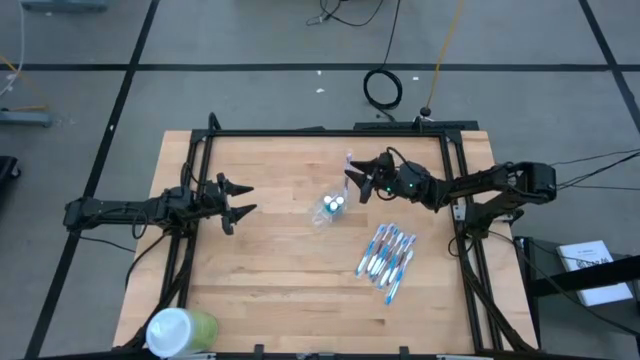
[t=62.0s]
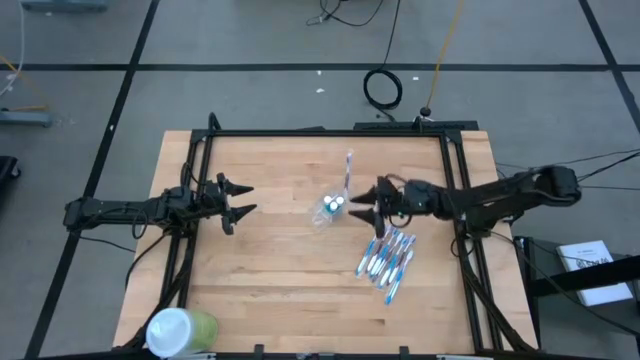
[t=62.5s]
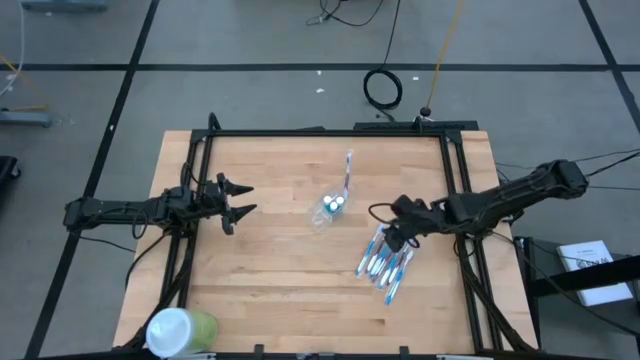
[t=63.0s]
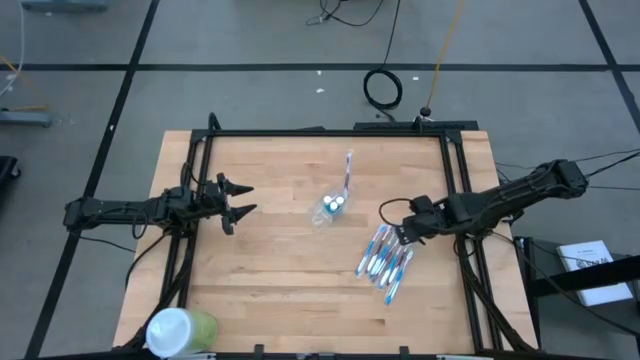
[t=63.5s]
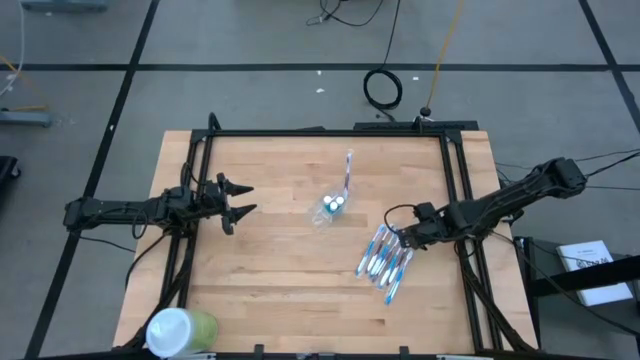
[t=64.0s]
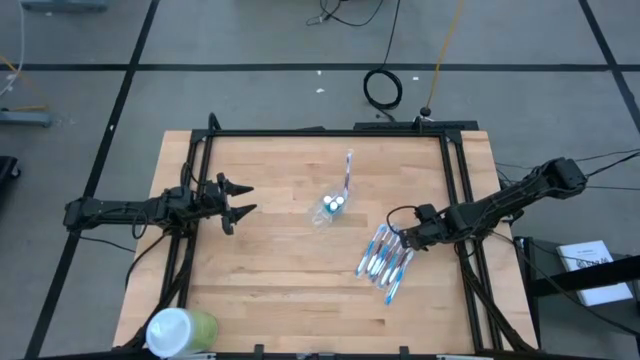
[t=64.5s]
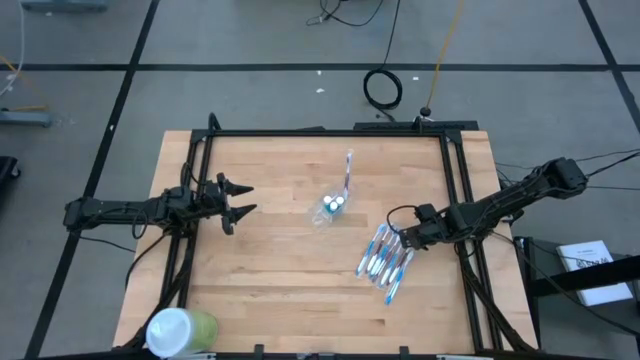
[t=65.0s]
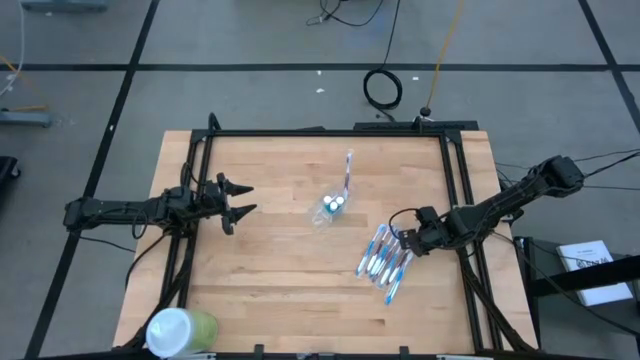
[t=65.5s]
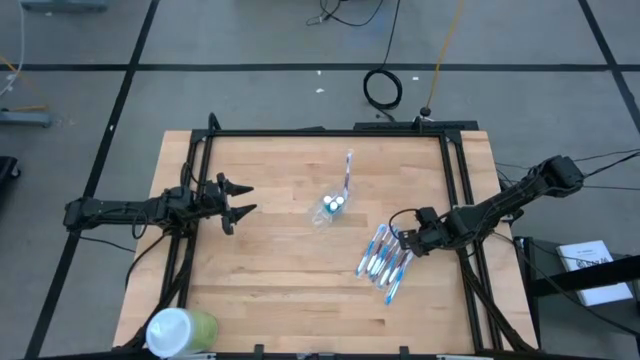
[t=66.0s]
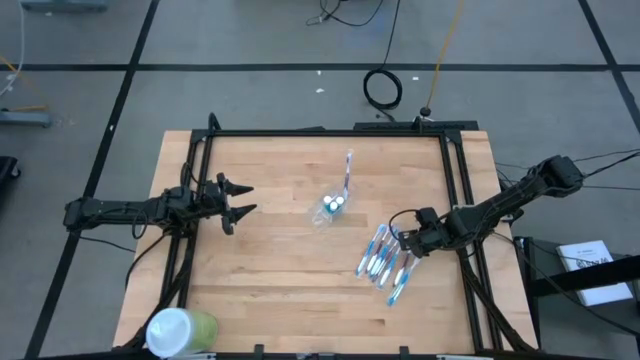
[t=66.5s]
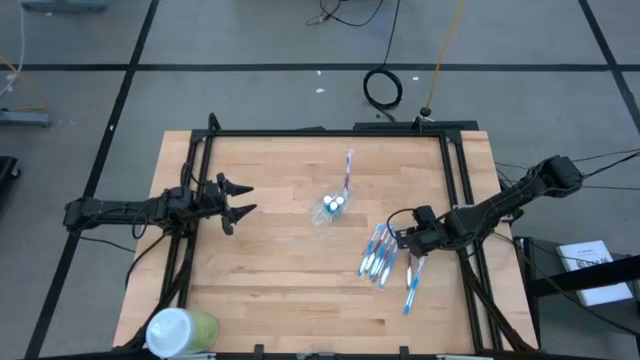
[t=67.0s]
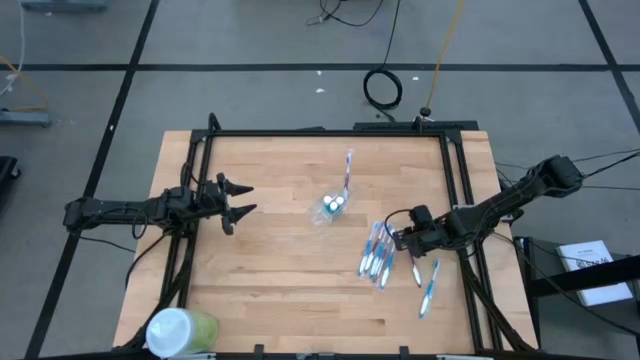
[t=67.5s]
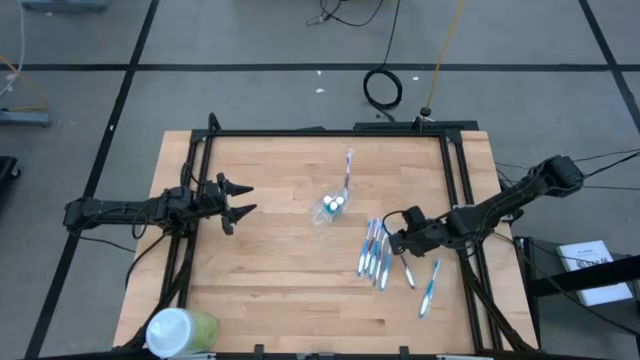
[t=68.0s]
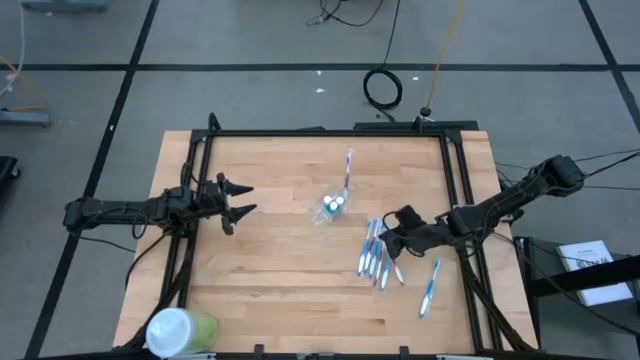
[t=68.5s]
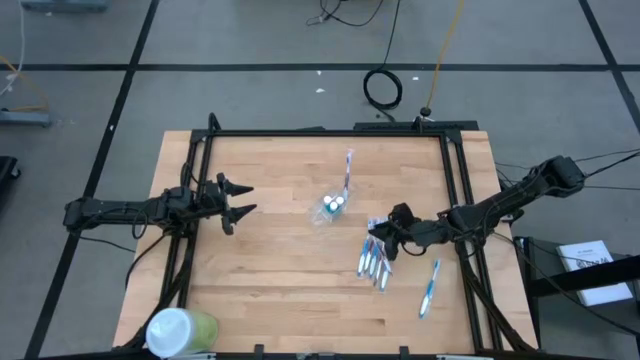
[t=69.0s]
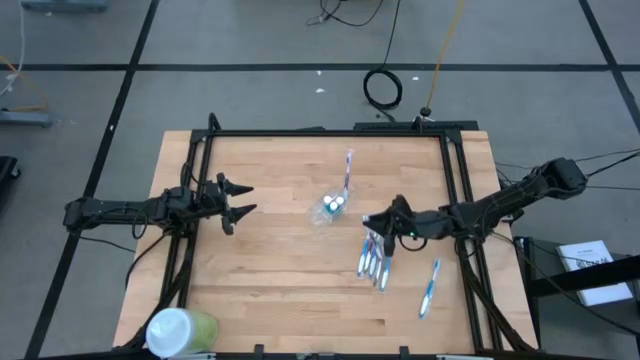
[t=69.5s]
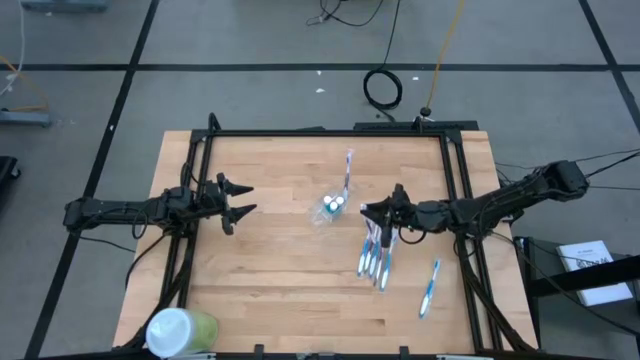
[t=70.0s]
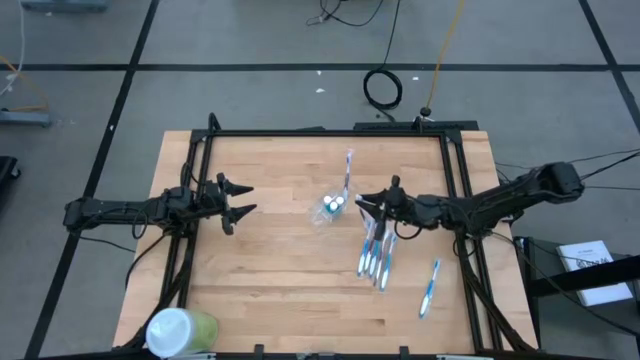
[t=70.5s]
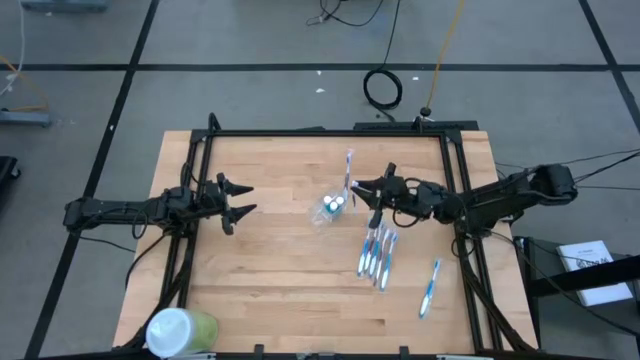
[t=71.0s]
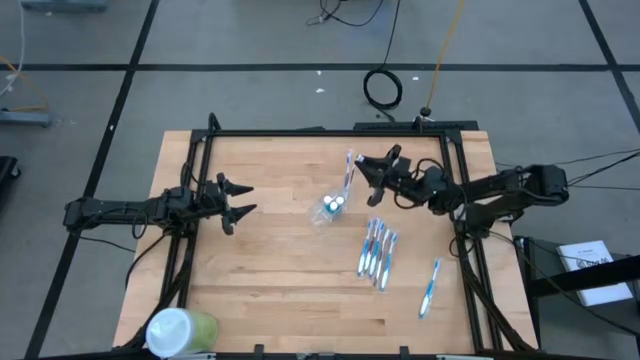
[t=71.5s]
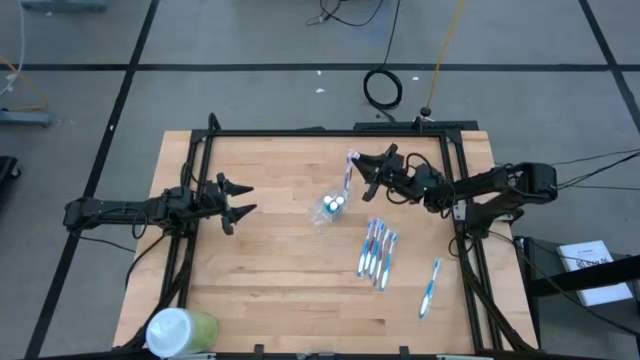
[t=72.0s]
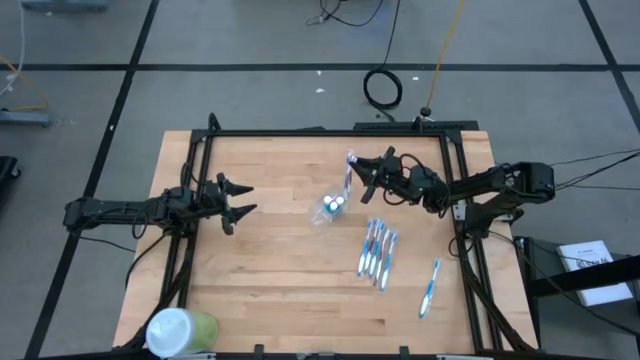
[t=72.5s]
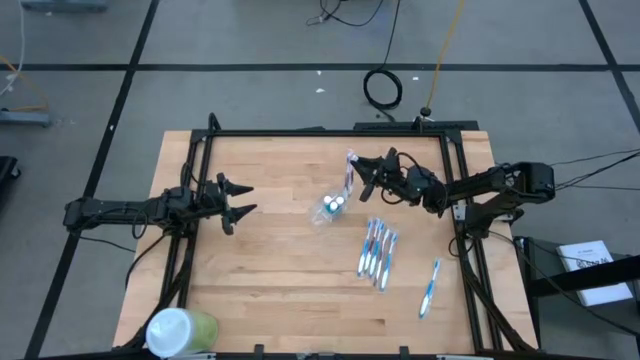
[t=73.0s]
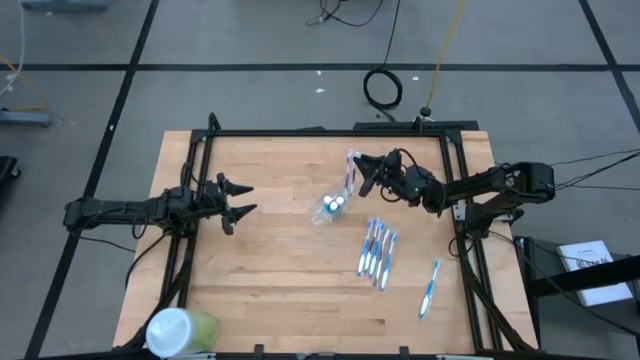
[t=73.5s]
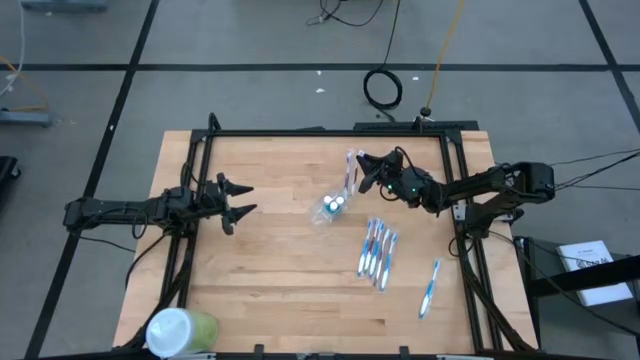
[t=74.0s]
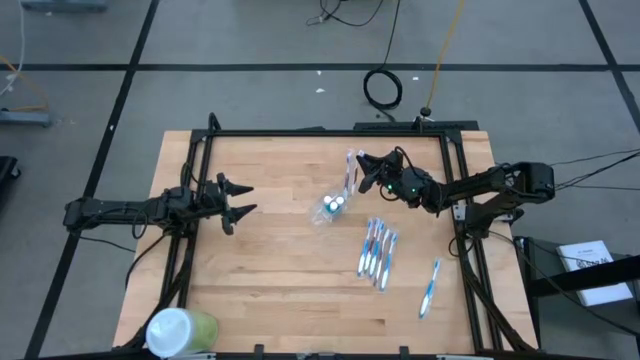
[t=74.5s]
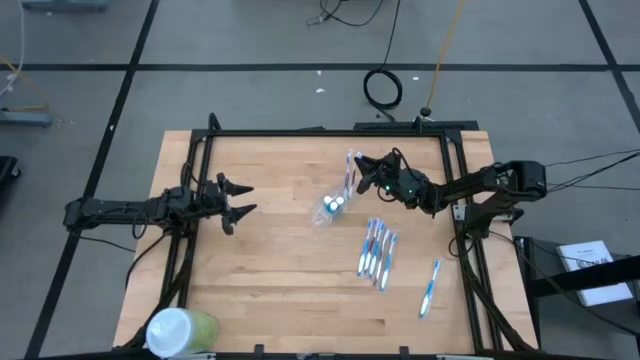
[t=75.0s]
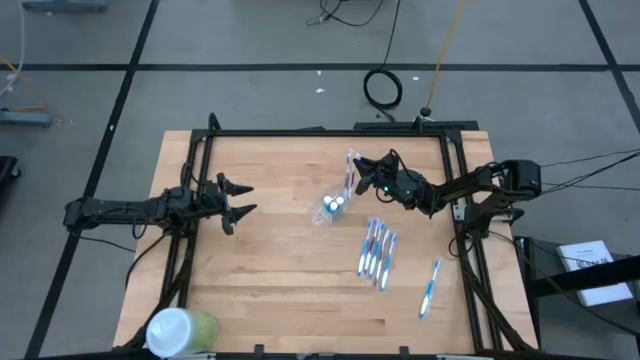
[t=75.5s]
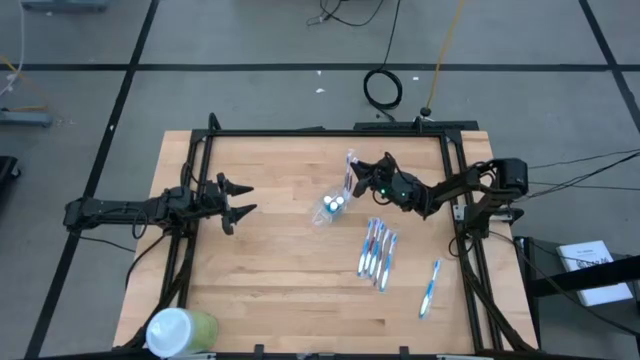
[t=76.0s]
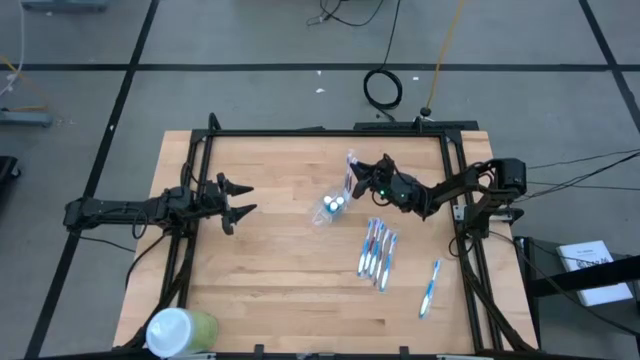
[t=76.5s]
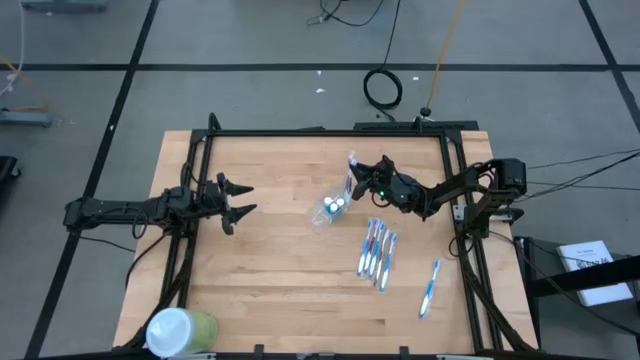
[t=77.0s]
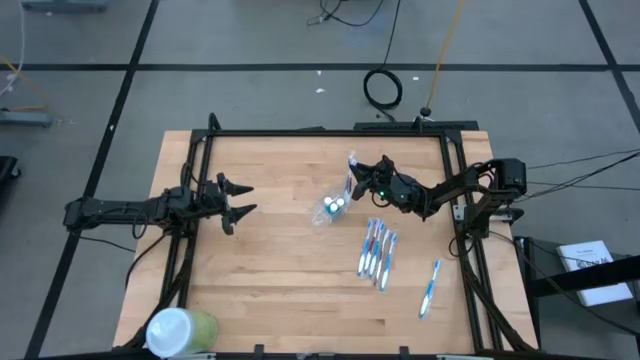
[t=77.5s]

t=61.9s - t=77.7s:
Task: Pick & Place toothbrushing station
Put the purple toothbrush into the transparent organizer

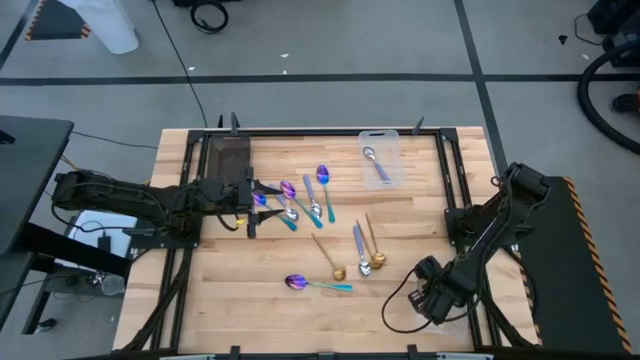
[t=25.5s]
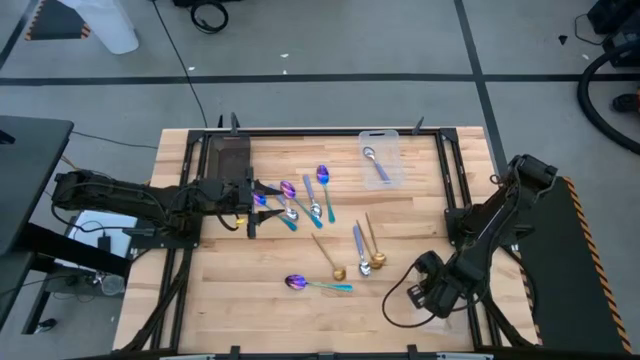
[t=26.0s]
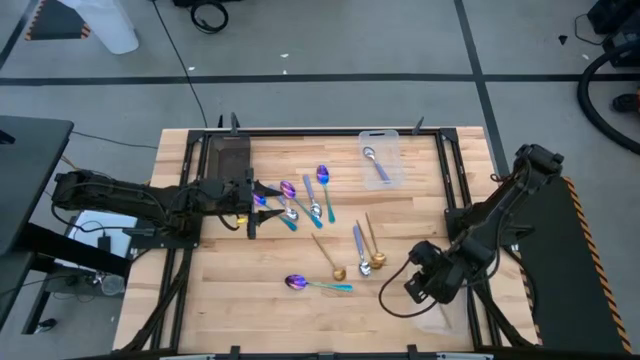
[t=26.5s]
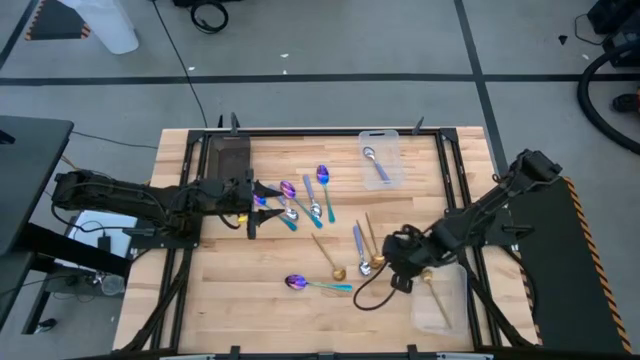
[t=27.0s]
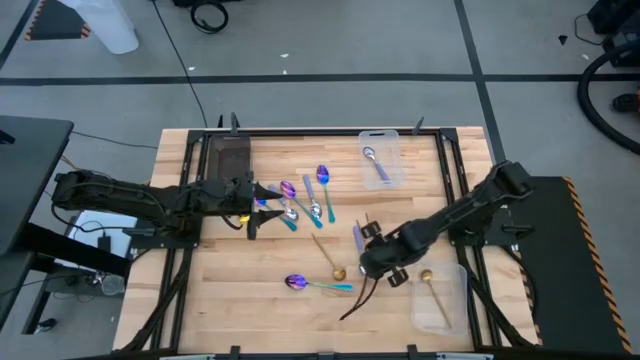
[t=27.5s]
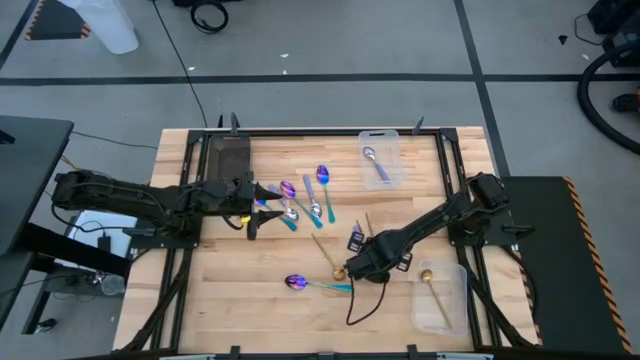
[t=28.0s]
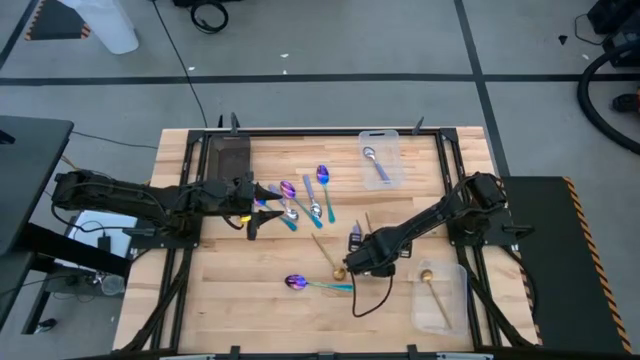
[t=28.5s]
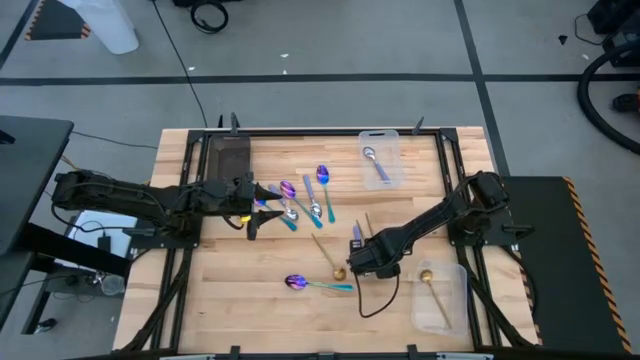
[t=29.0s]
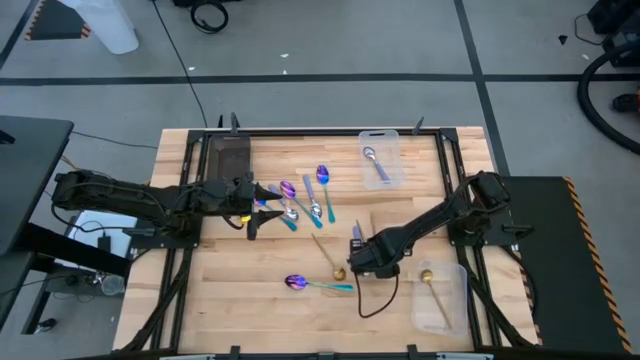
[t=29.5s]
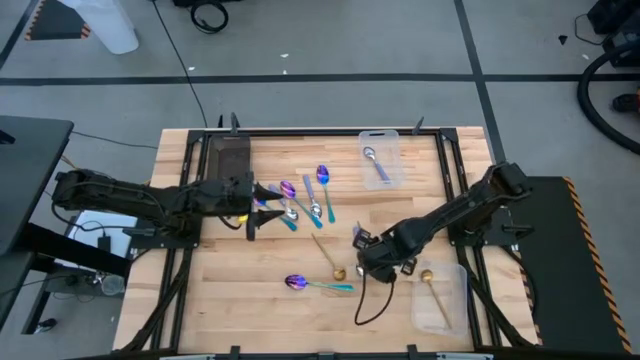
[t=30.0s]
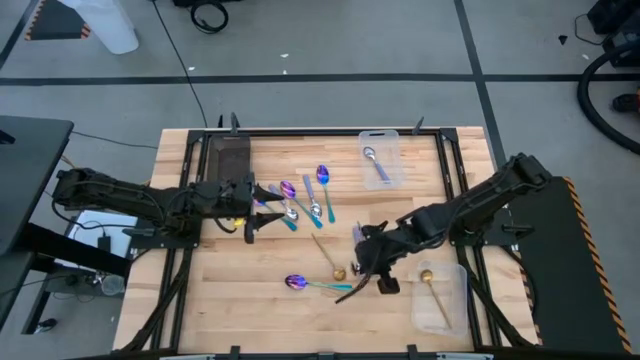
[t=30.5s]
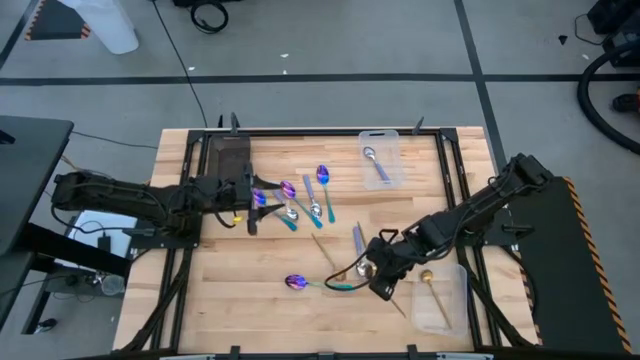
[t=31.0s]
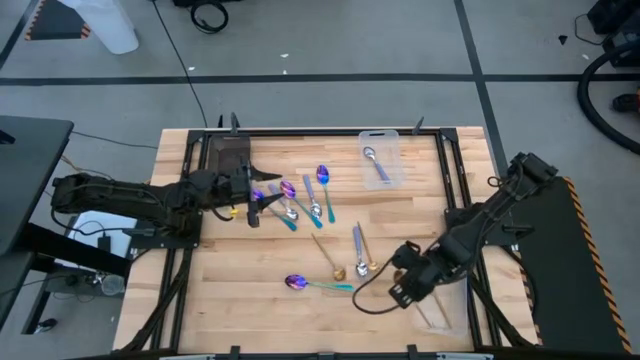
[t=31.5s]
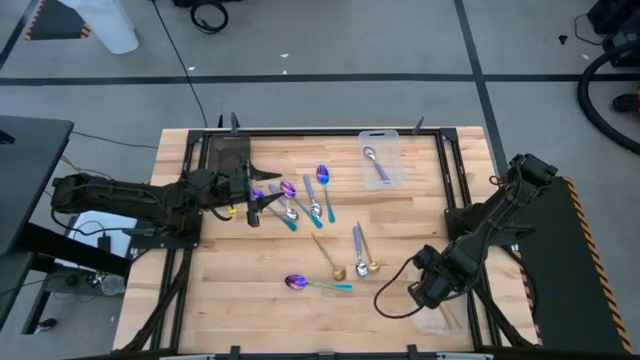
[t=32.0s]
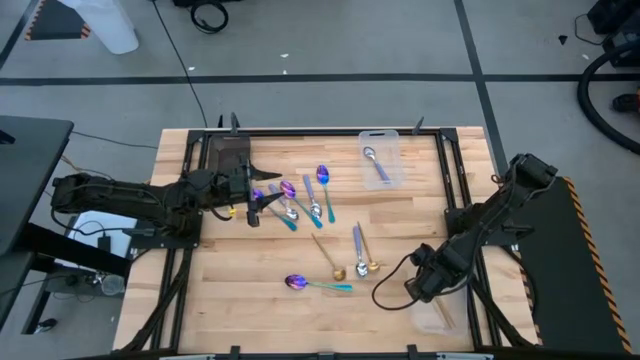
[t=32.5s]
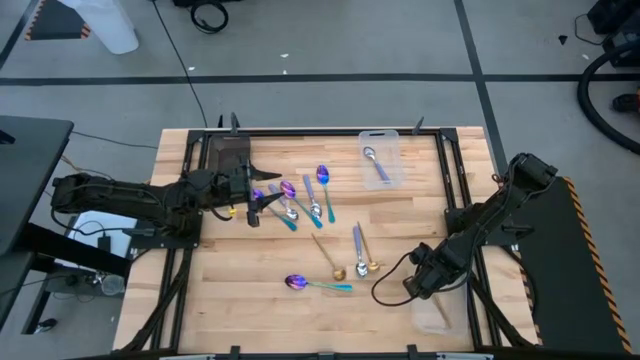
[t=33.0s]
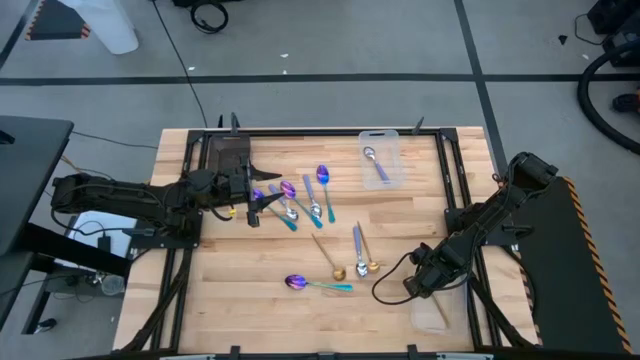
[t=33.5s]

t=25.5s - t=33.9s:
Task: Sort silverware by color (type)
Put the gold spoon into the bottom transparent bin
